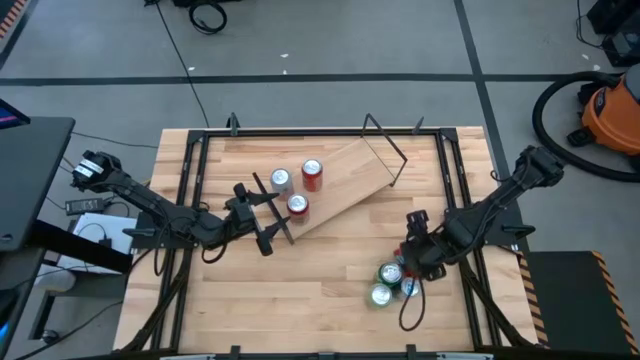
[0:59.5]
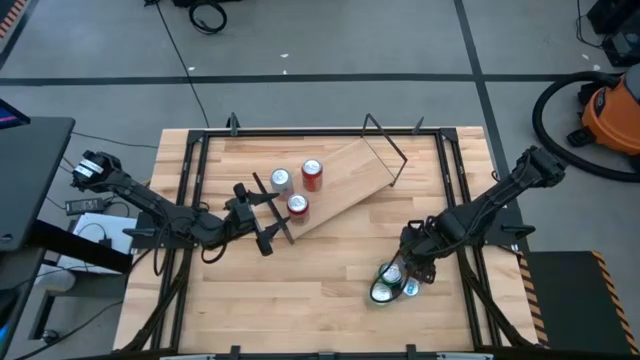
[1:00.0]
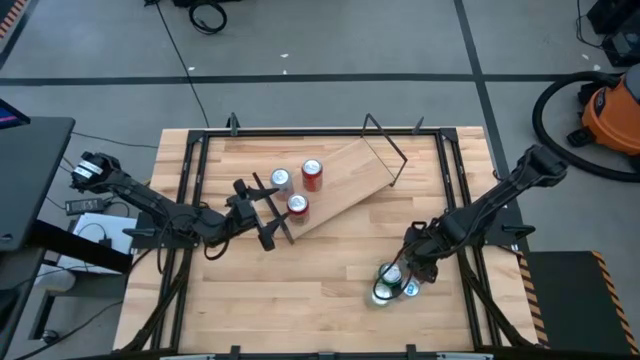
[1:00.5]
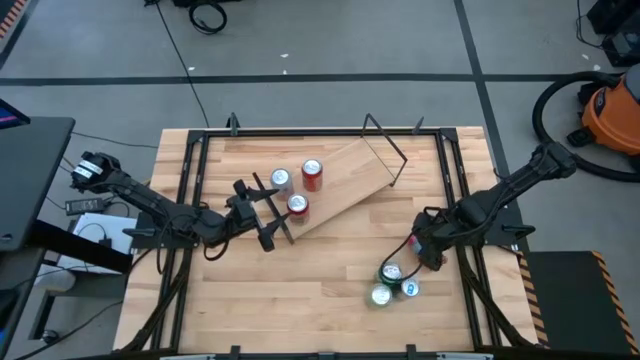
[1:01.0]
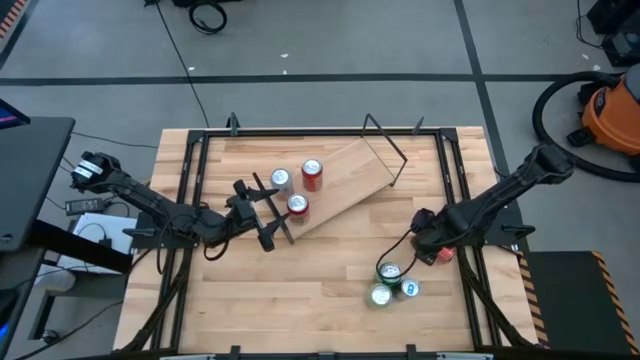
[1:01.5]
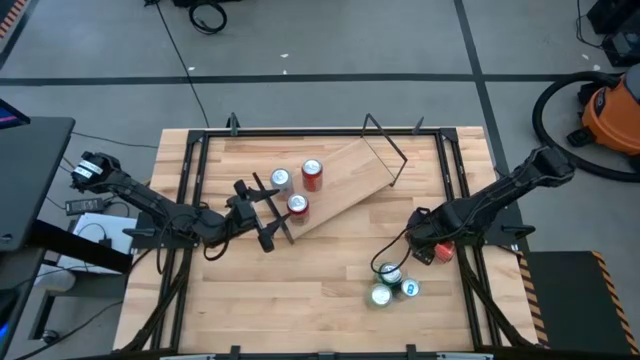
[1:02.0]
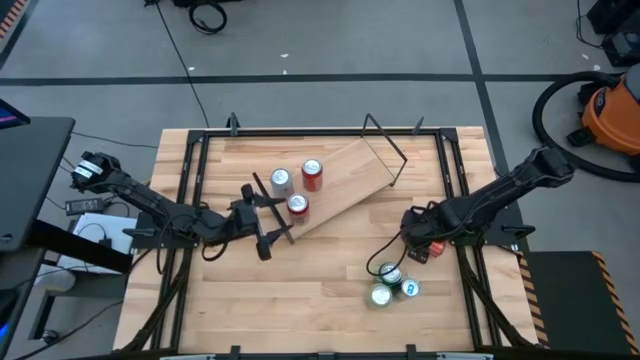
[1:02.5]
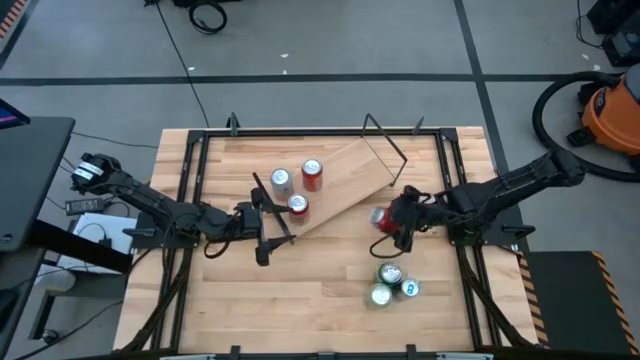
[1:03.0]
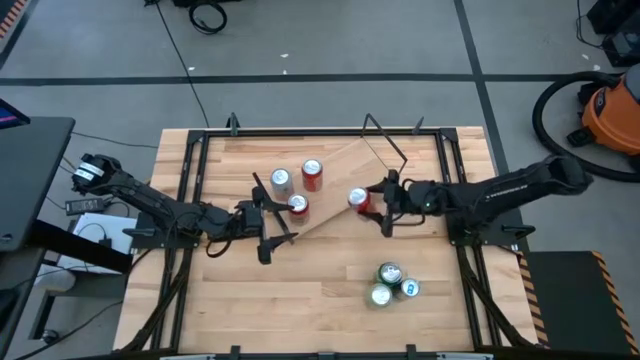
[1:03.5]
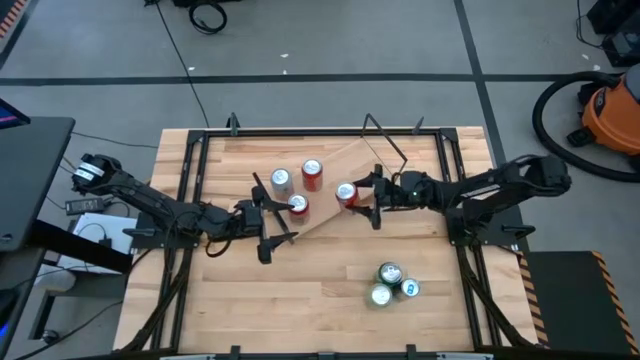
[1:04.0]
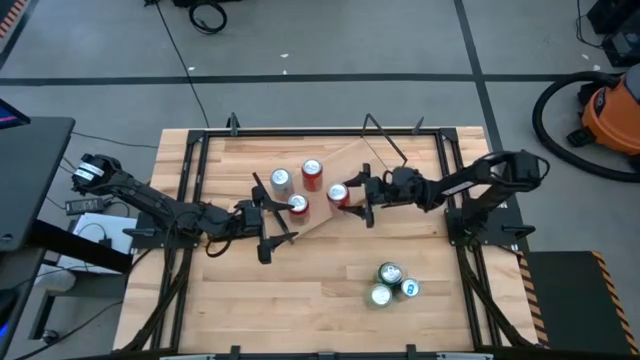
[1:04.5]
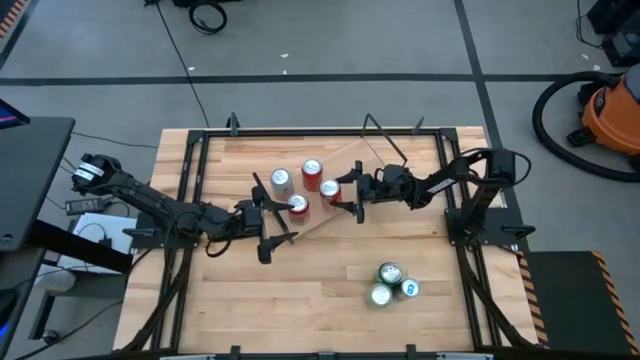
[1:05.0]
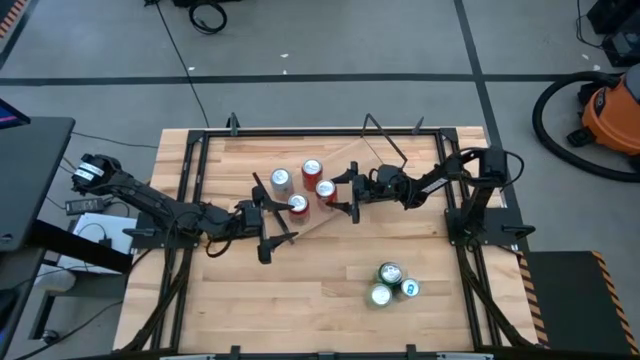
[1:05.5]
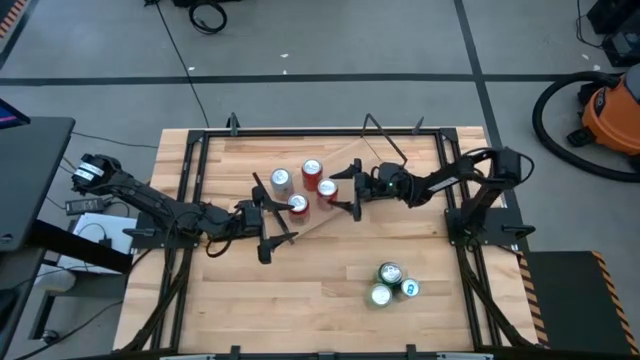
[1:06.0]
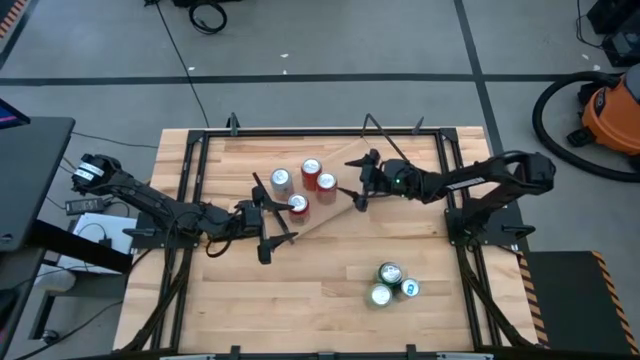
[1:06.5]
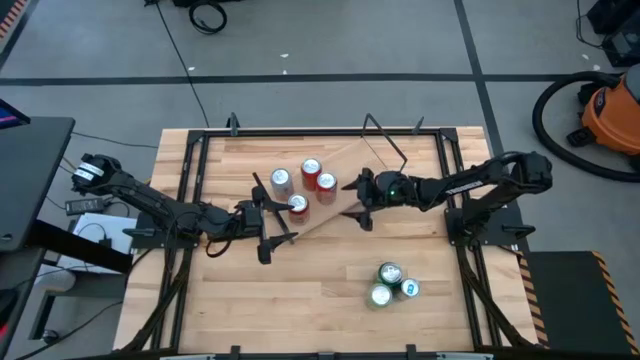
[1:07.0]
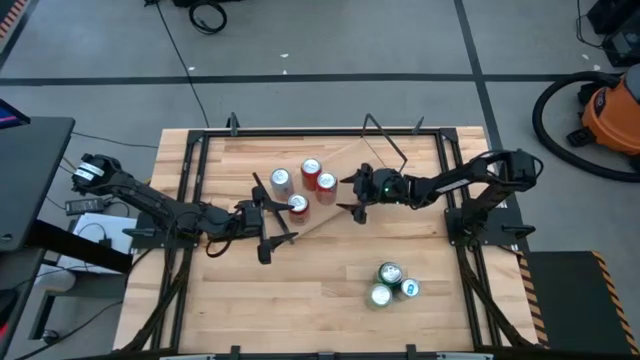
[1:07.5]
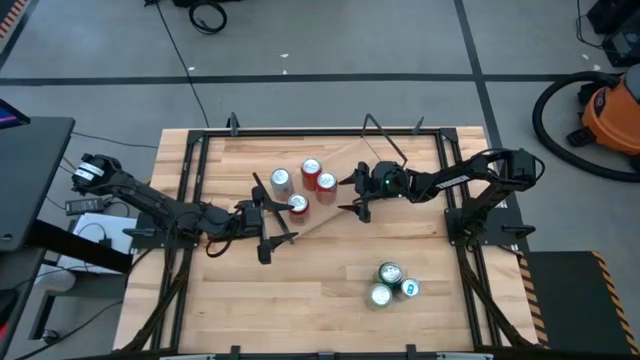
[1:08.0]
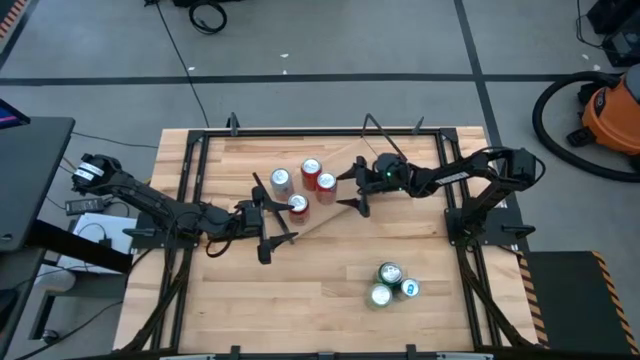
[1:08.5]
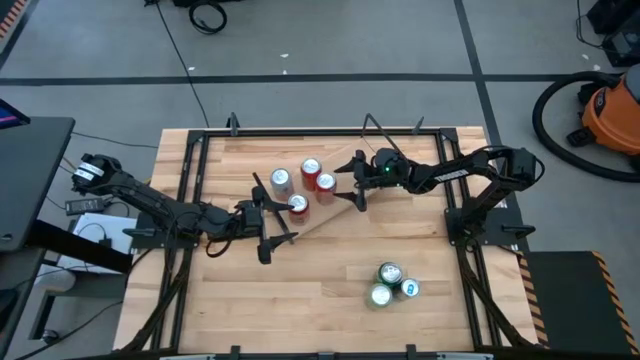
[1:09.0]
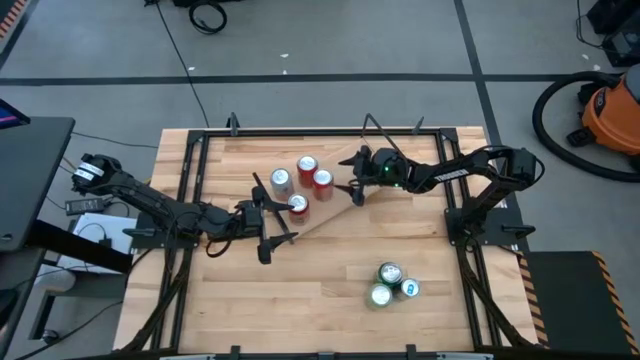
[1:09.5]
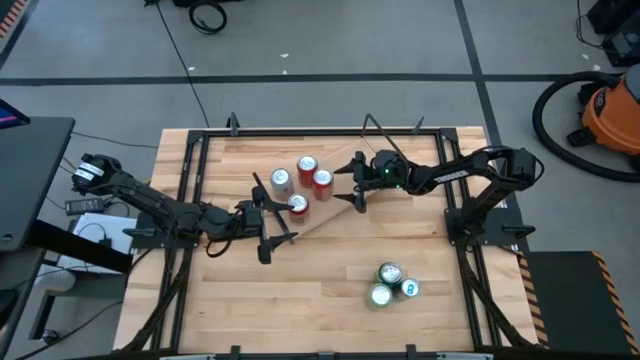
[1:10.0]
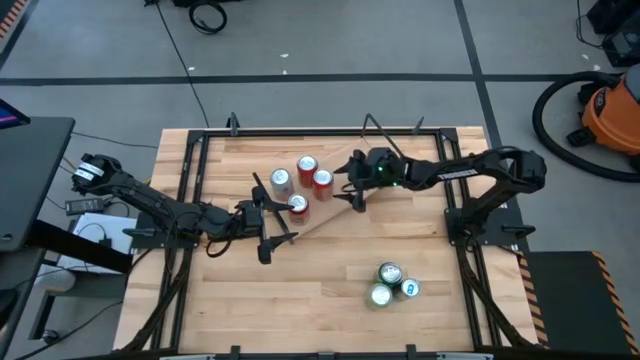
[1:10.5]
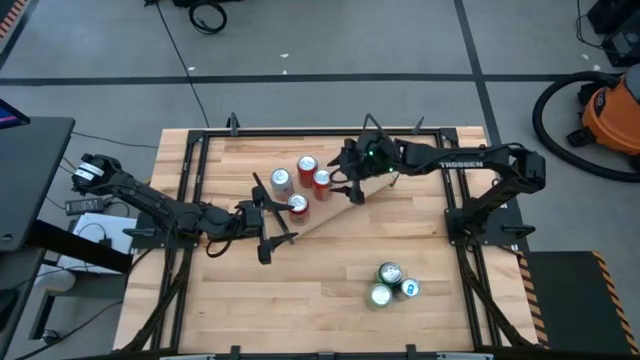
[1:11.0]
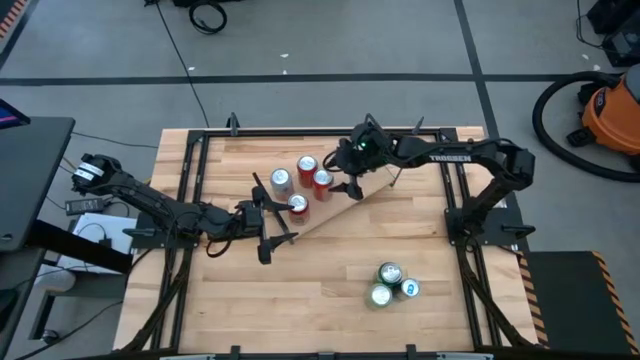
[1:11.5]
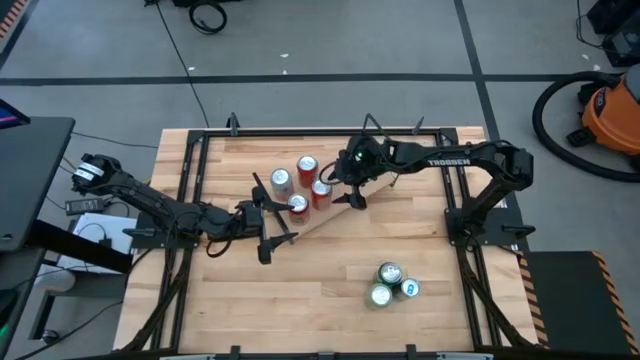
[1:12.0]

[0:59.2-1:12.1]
Task: Place canned beverage on shelf
Put the red soda can on the shelf

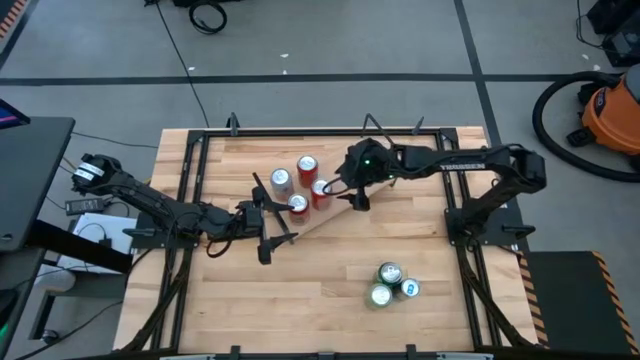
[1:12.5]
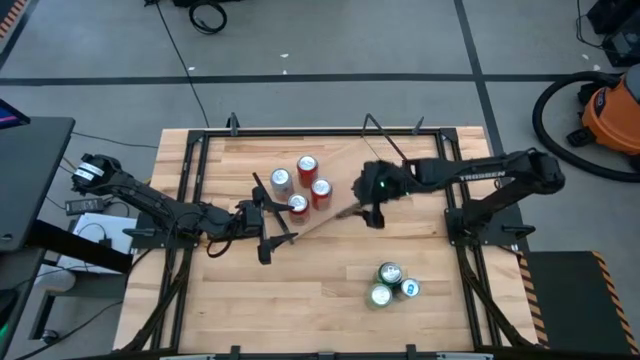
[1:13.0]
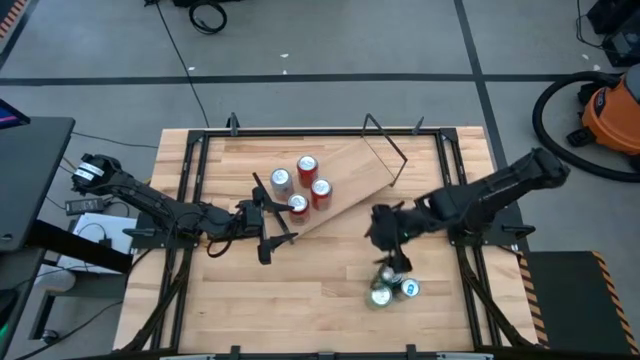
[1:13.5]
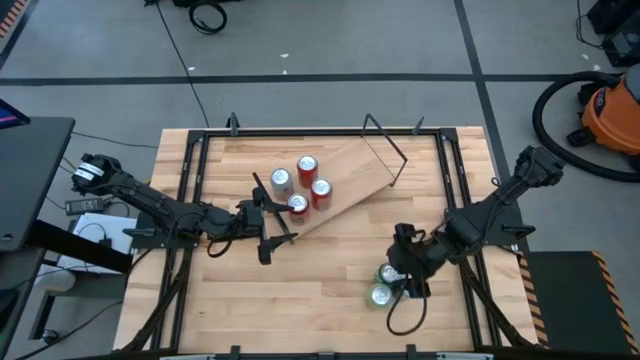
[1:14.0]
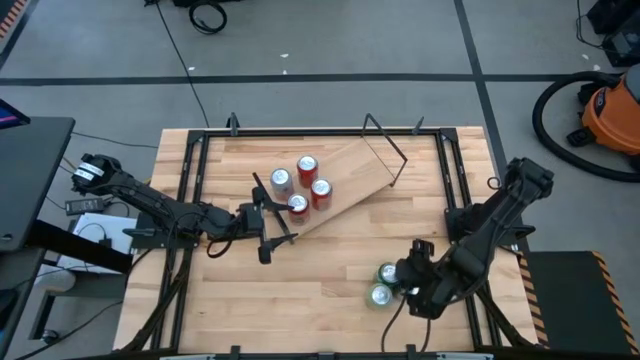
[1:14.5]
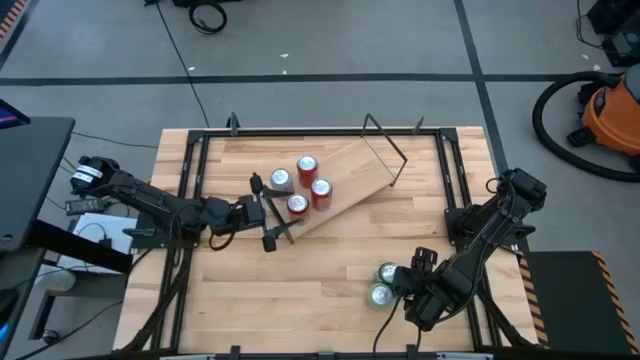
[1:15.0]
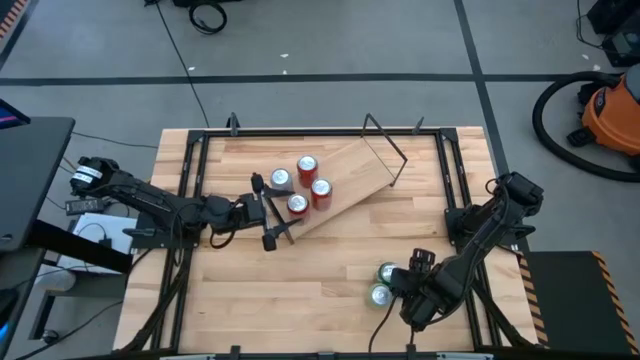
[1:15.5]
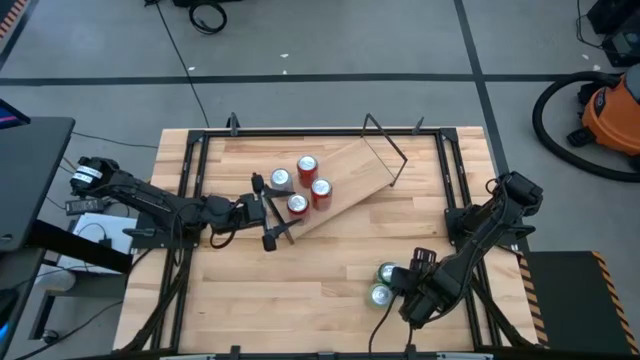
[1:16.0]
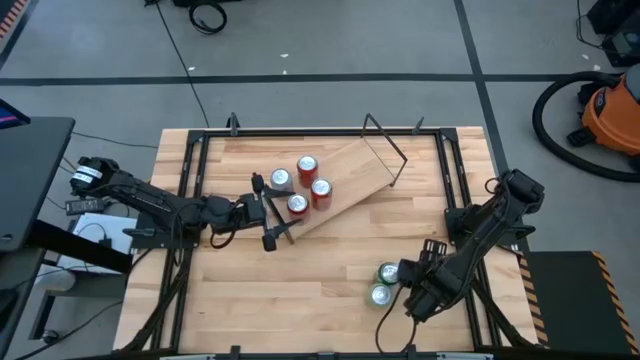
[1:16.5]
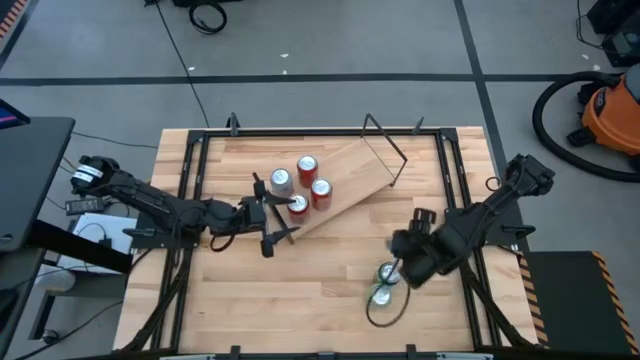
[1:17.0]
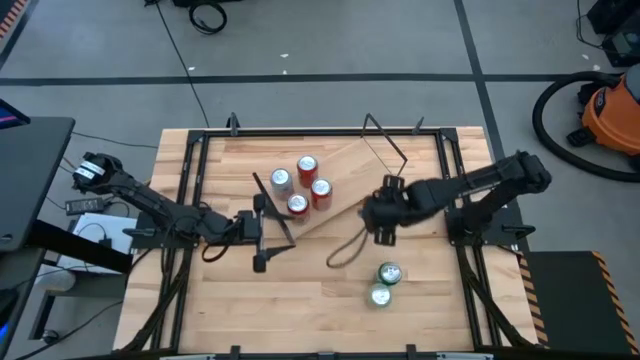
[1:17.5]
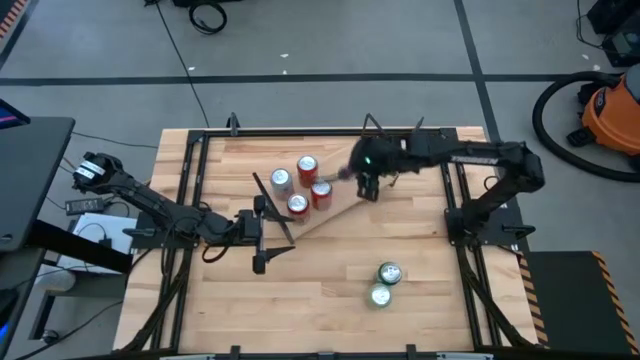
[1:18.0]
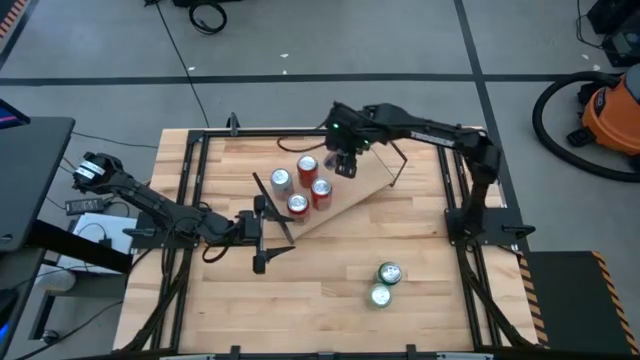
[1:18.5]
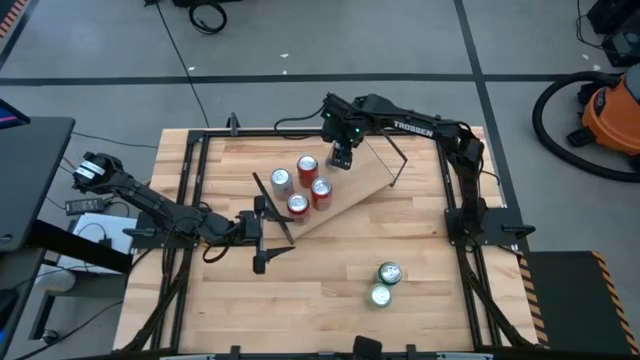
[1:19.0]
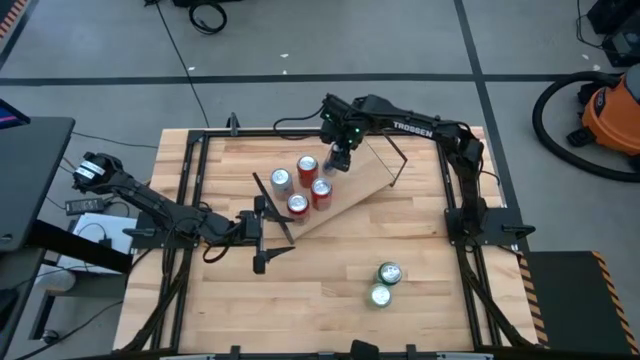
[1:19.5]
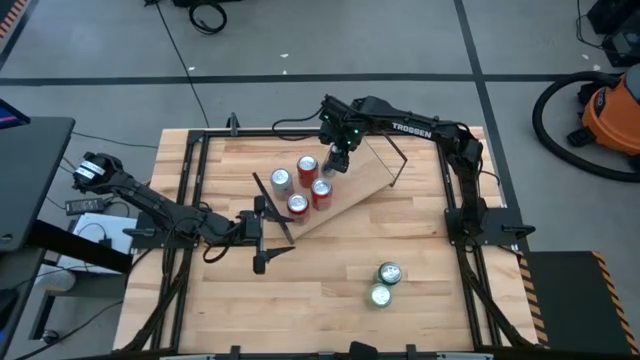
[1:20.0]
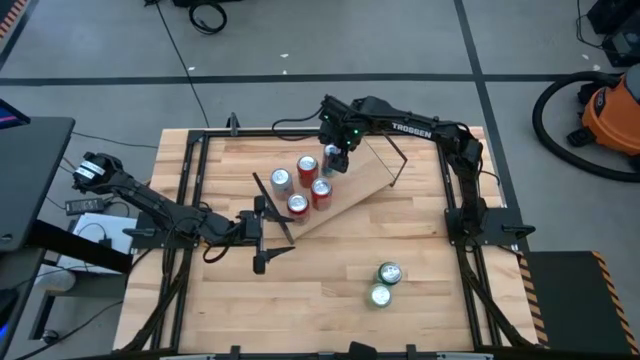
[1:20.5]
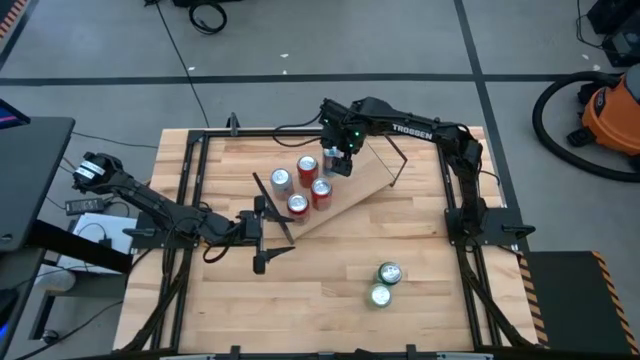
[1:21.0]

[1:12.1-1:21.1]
Put the blue soda can on the shelf
